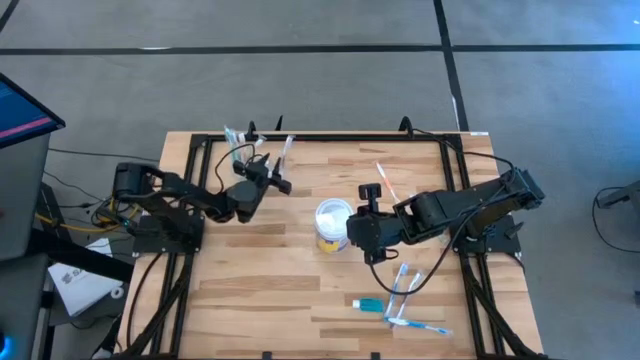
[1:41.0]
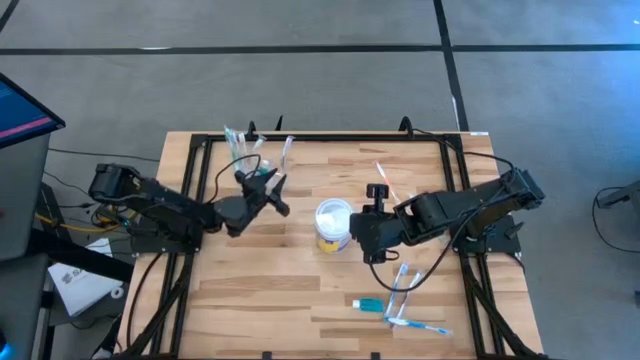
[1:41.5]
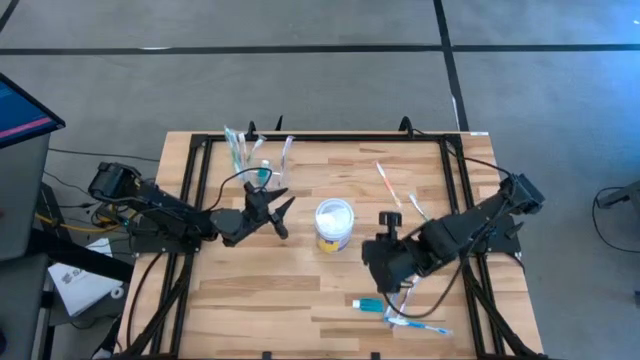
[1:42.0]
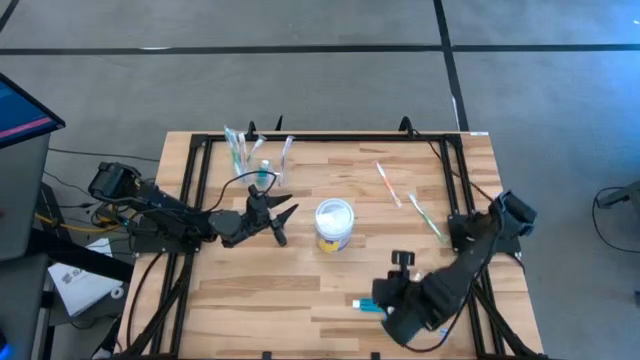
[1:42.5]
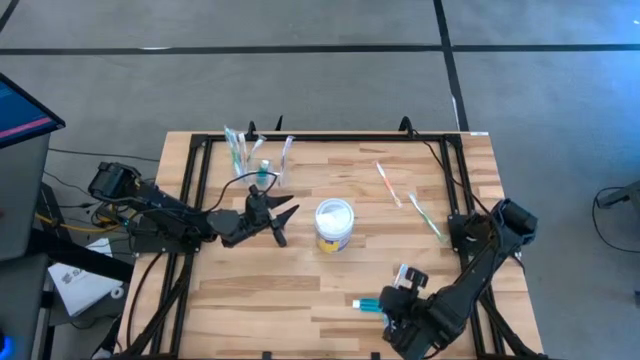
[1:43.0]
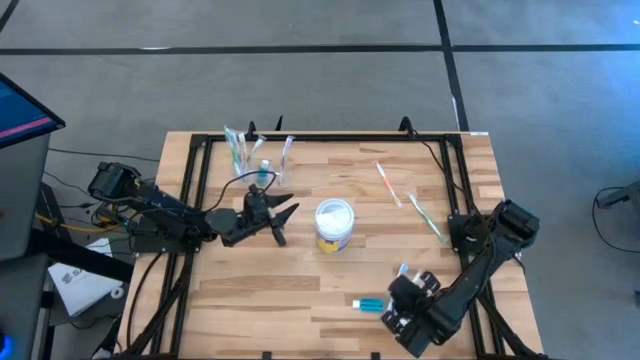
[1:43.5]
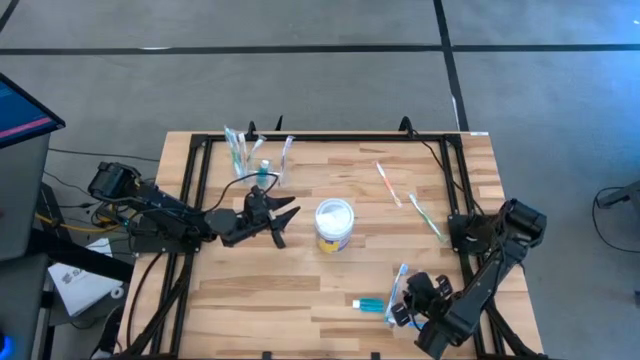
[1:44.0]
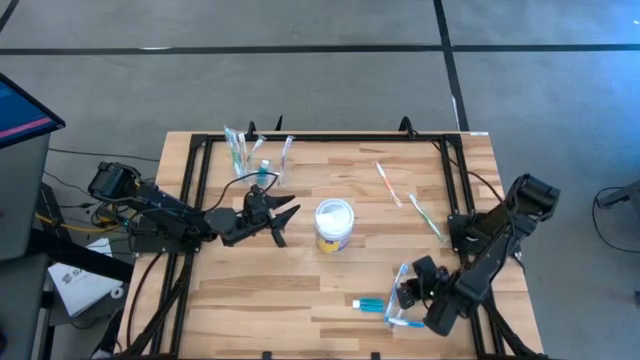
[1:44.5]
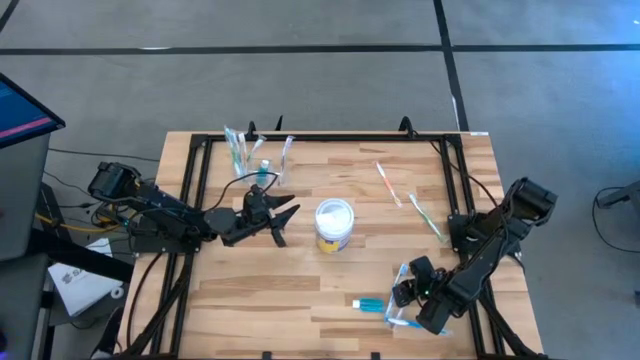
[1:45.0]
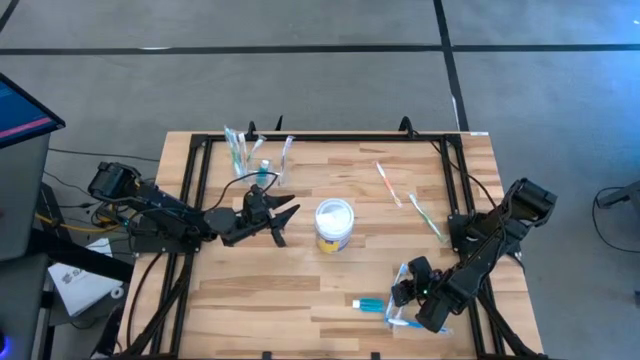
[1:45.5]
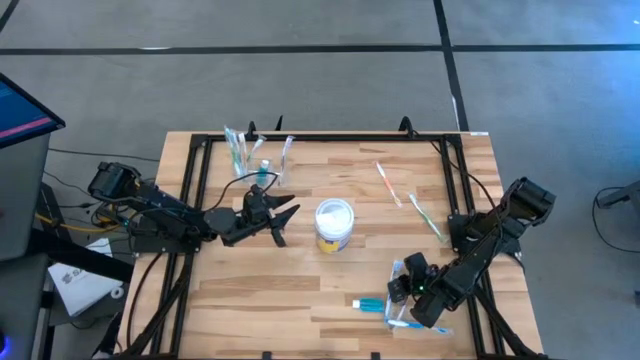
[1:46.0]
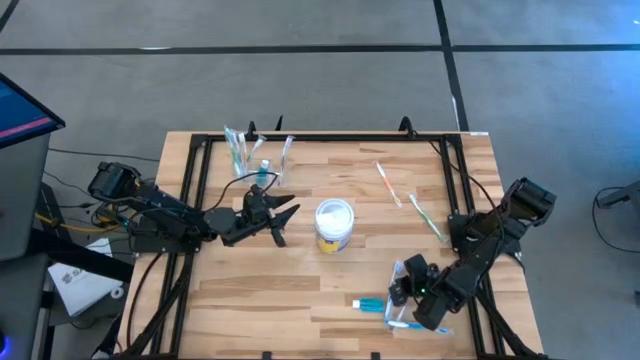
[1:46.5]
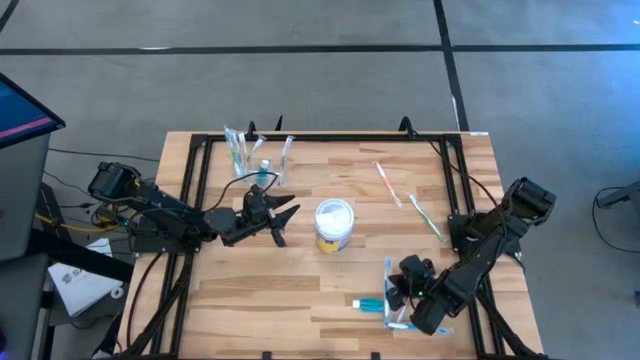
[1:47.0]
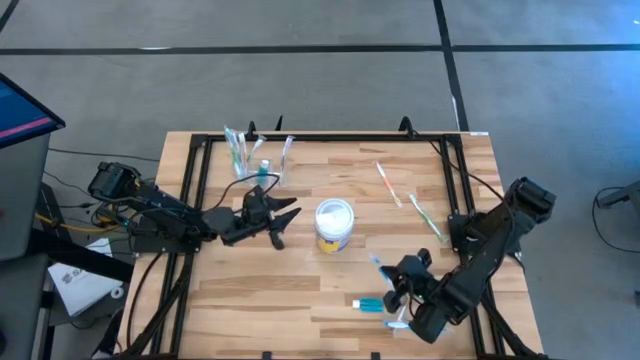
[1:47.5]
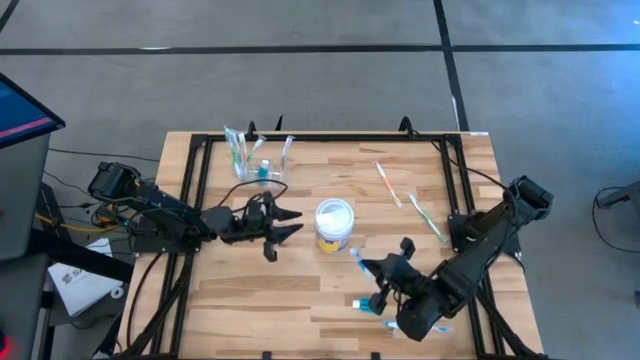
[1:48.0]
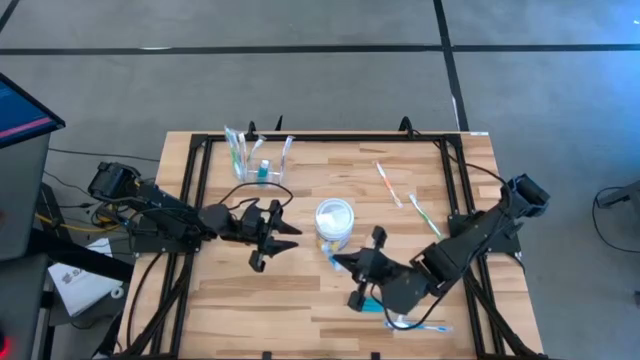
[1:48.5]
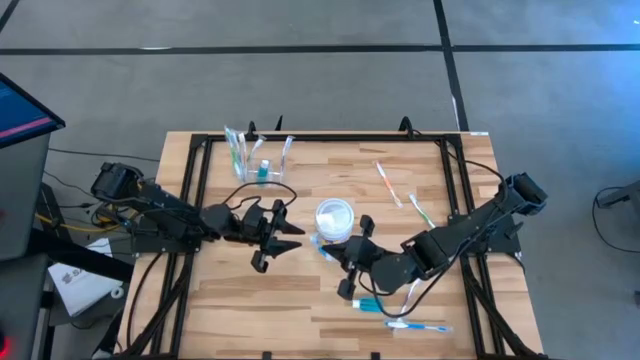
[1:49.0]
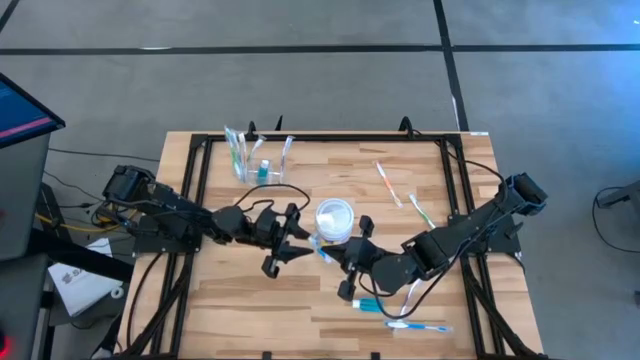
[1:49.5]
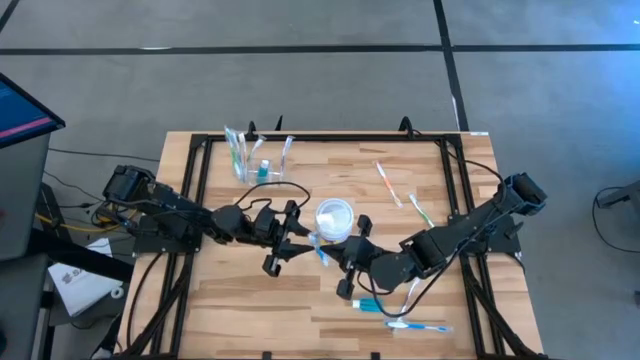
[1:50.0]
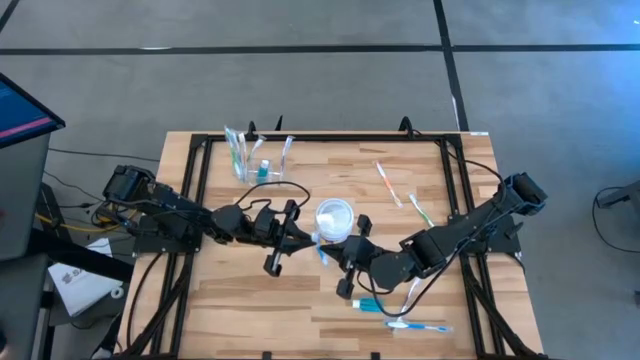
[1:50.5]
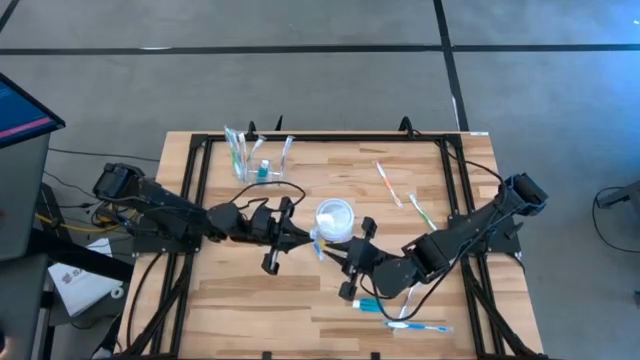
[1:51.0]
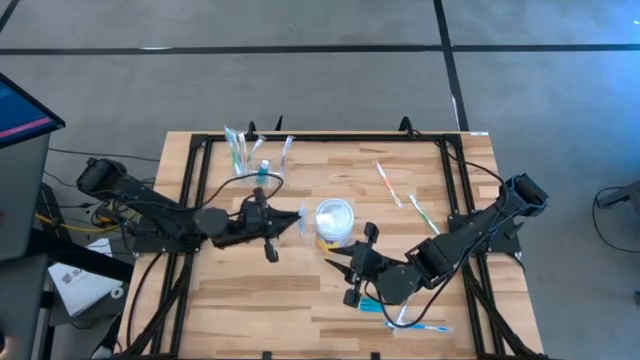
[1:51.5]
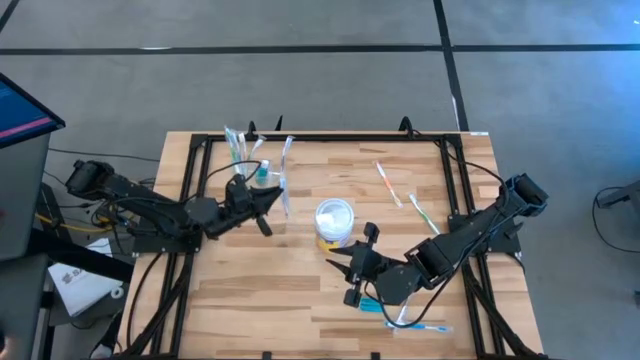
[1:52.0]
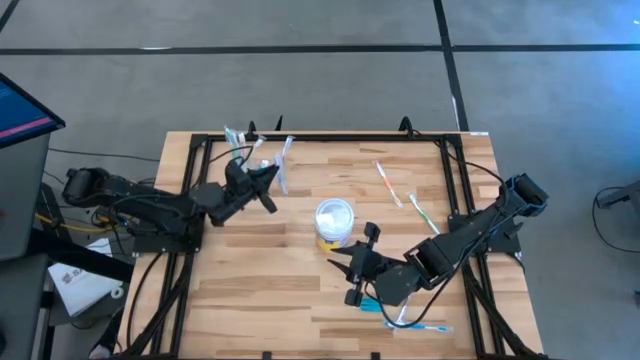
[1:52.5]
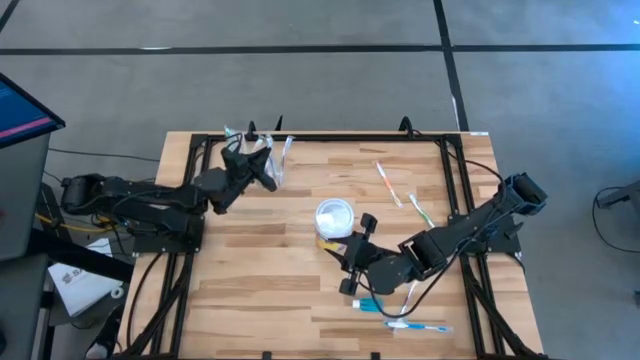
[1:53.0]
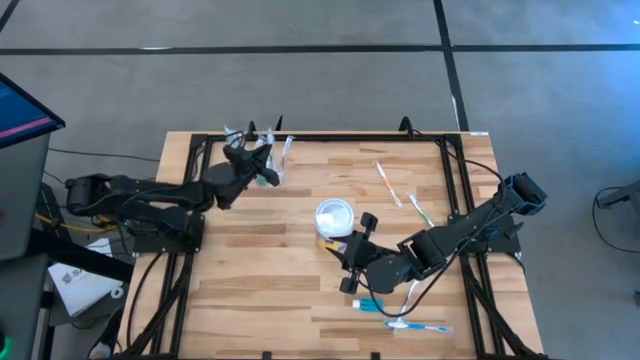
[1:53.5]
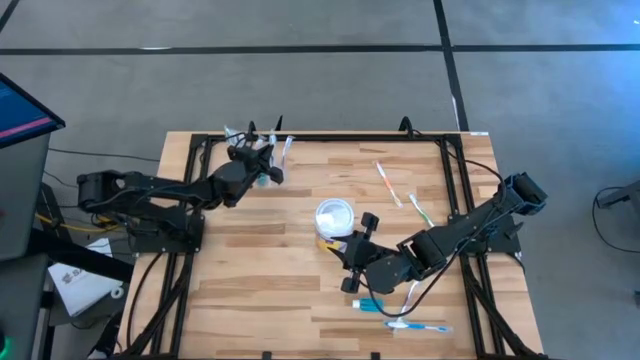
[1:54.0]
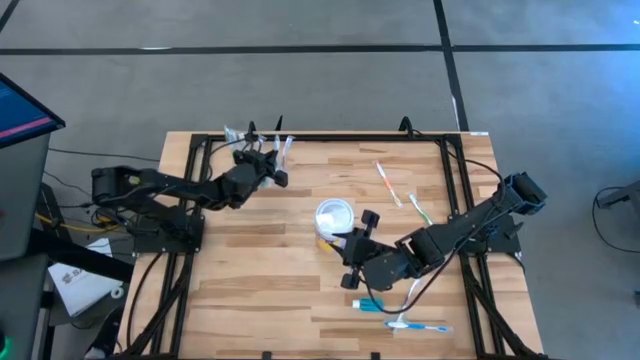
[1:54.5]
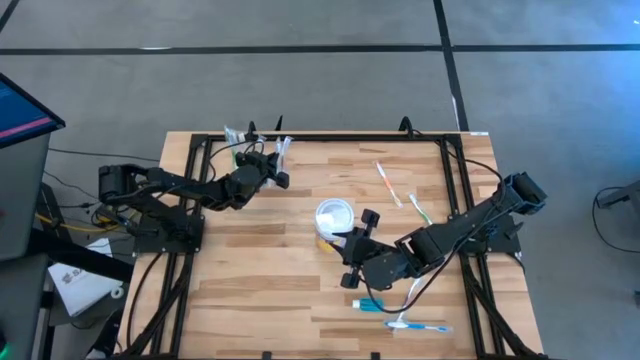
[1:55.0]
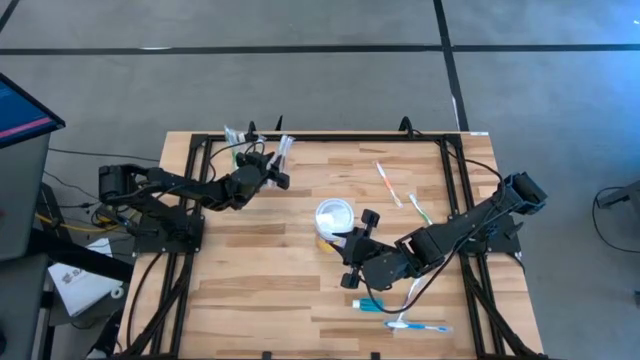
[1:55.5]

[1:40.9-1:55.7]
Task: Pick & Place toothbrushing station
Put the top blue toothbrush into the transparent organizer

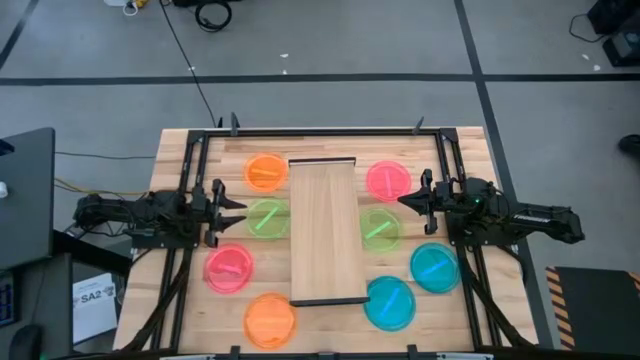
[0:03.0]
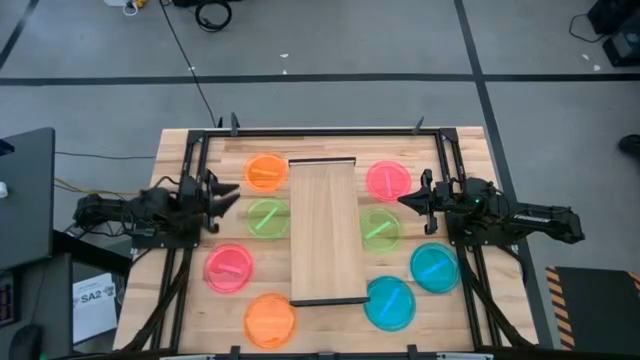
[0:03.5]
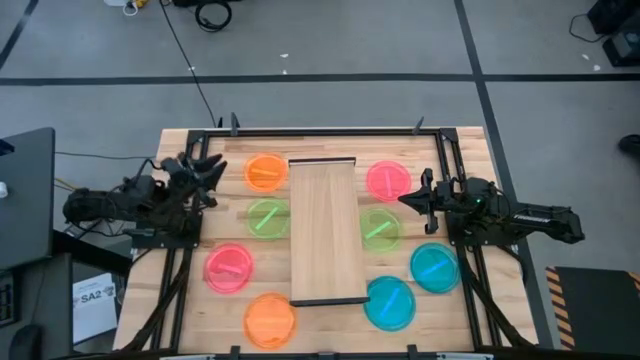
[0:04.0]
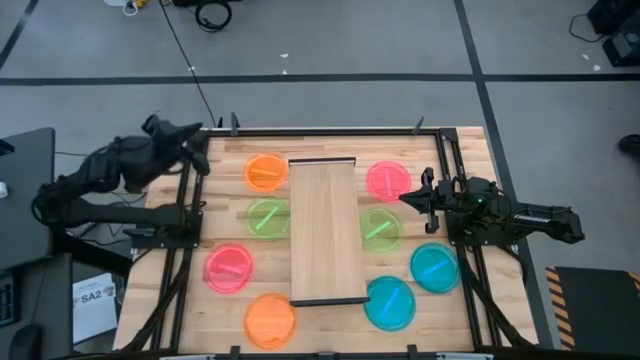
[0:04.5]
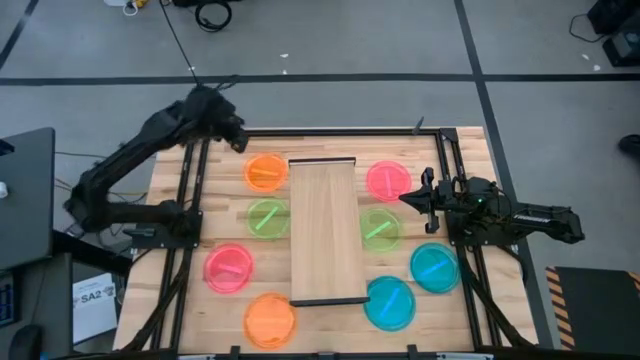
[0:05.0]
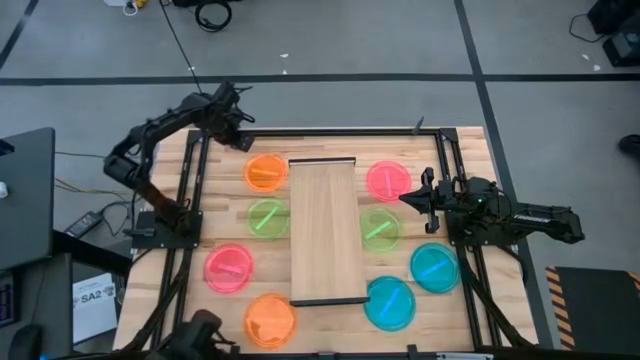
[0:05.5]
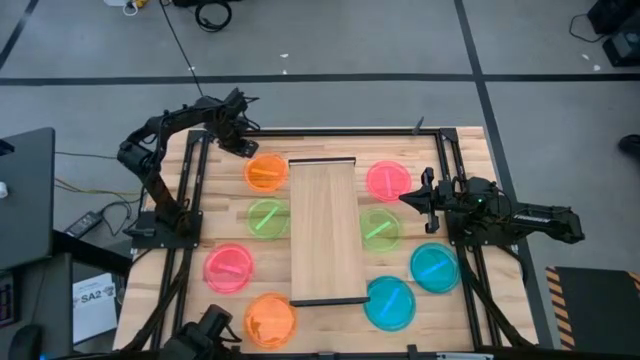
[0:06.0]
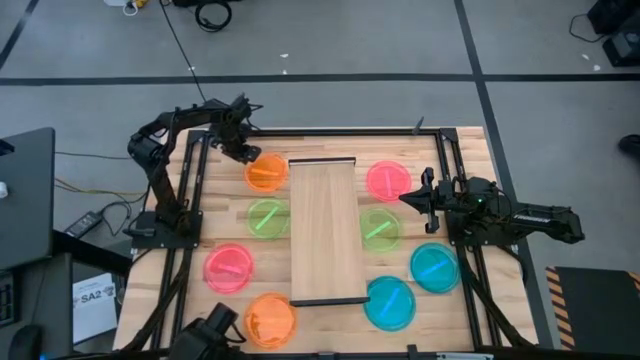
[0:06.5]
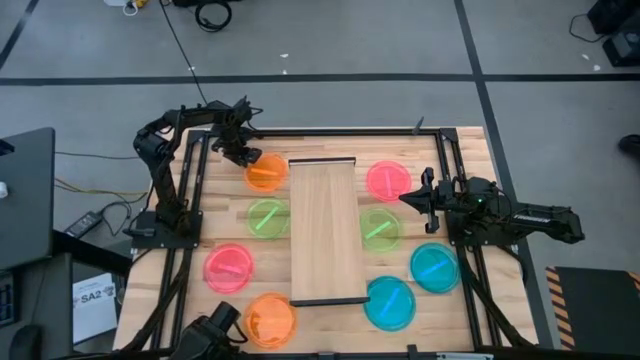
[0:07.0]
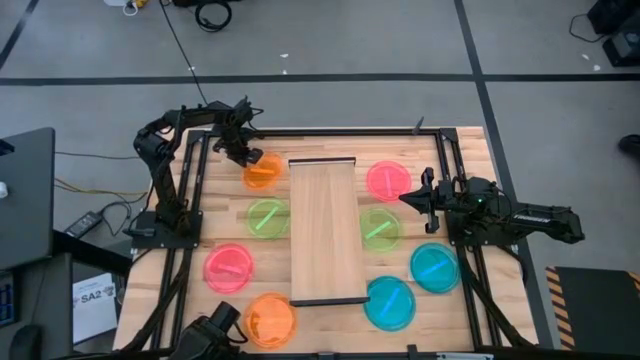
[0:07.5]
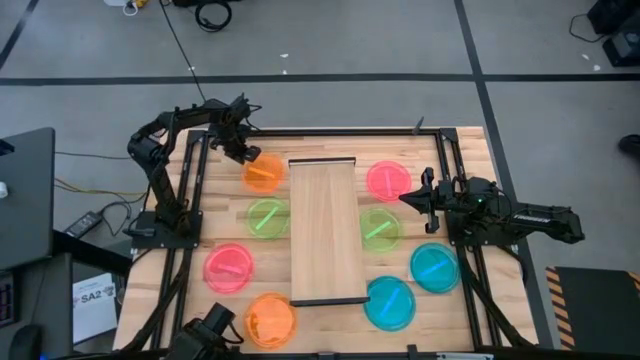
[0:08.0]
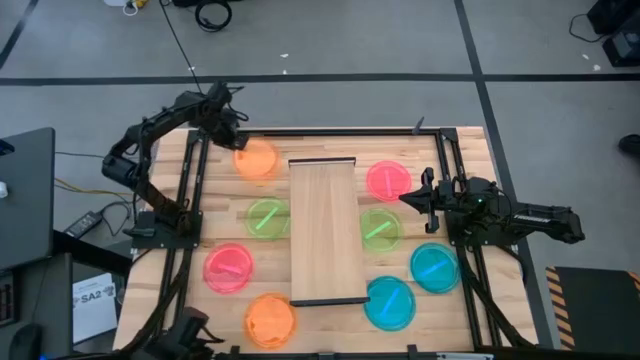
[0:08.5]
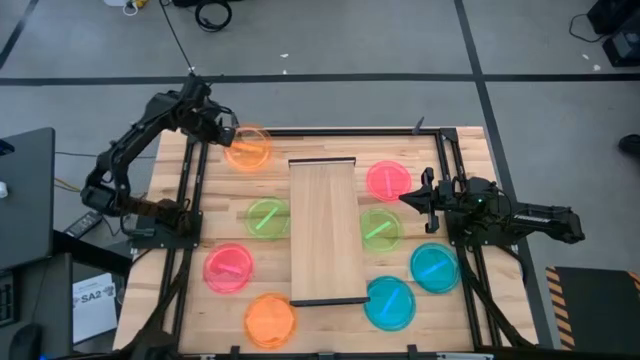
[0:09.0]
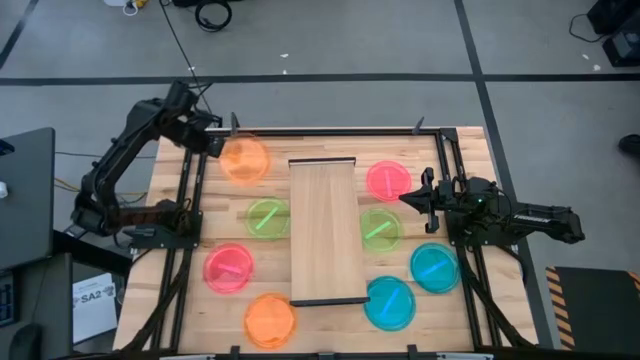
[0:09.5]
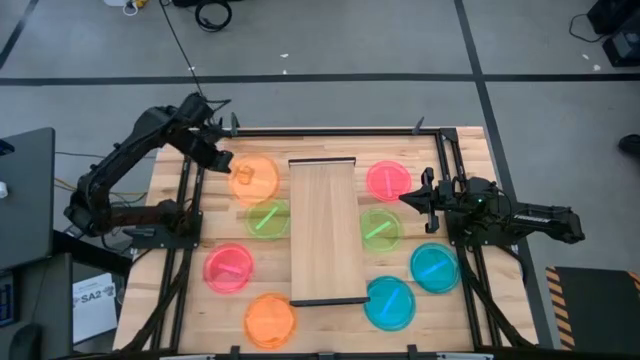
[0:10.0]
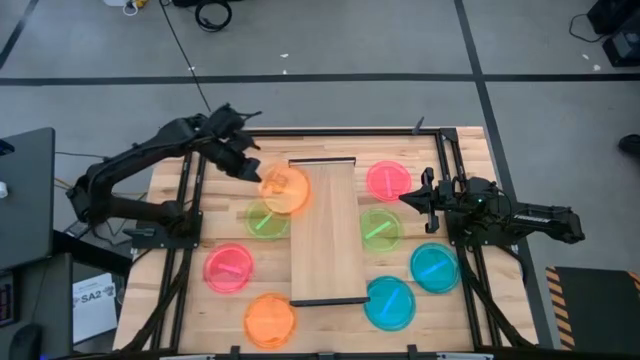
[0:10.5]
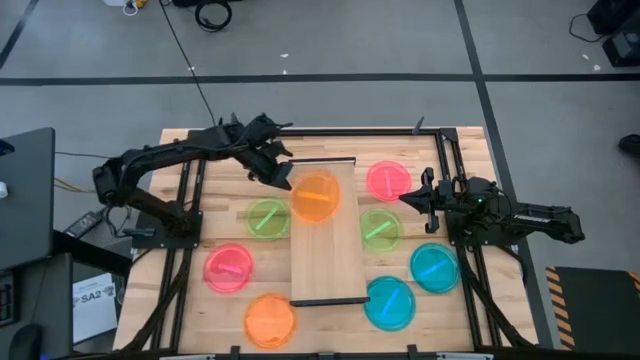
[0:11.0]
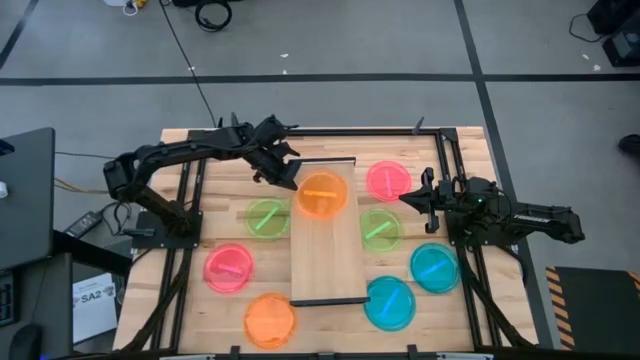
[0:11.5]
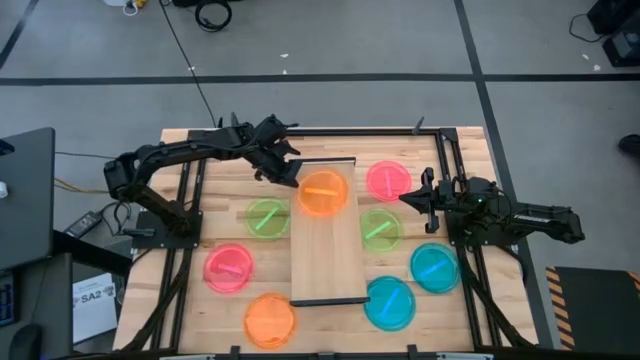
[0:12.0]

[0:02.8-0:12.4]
Task: Place and stack plates onto a shelf
Put the top orange plate on the shelf
